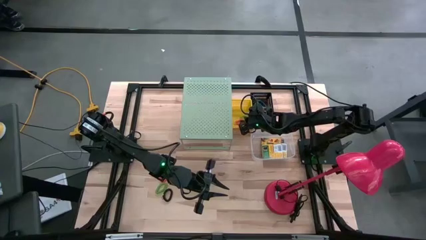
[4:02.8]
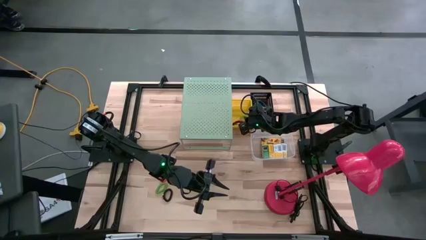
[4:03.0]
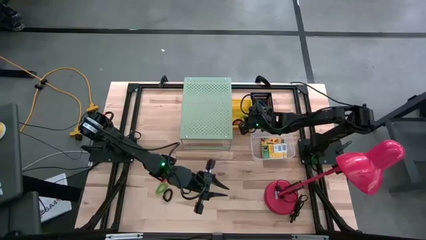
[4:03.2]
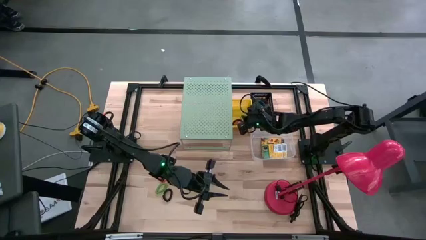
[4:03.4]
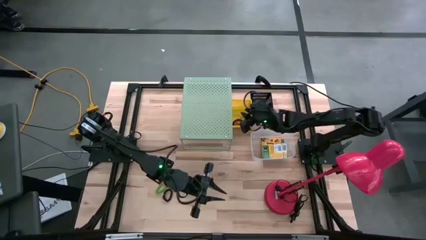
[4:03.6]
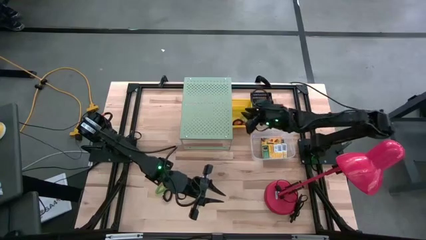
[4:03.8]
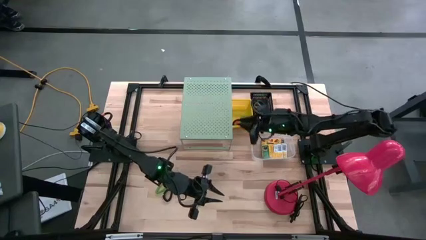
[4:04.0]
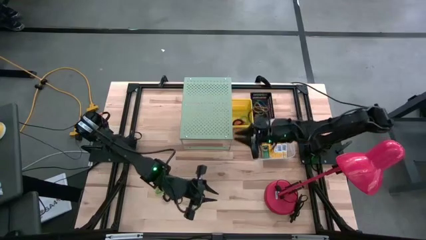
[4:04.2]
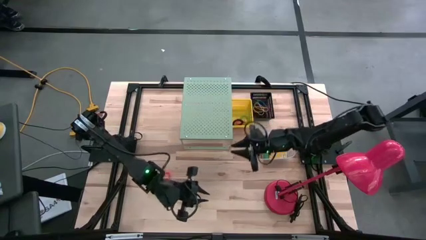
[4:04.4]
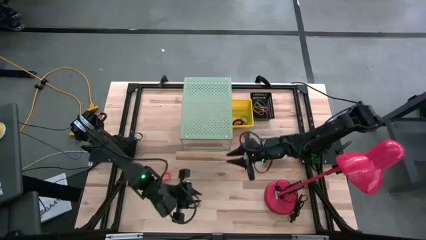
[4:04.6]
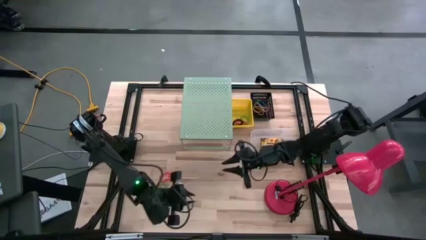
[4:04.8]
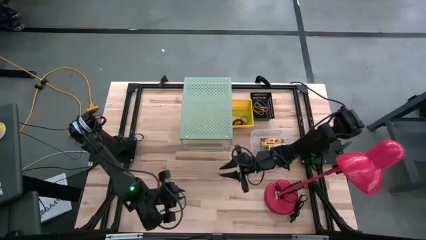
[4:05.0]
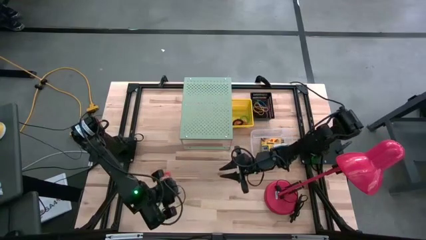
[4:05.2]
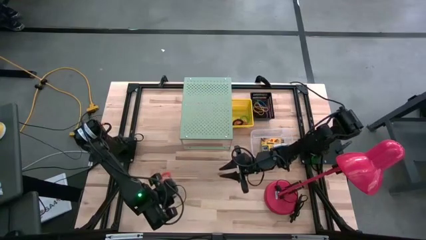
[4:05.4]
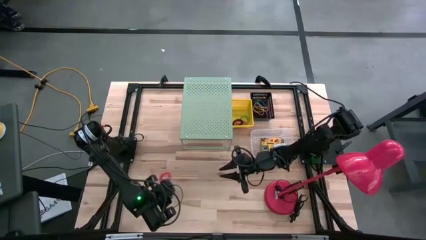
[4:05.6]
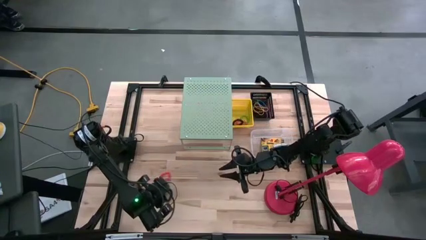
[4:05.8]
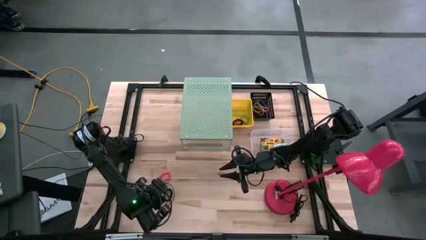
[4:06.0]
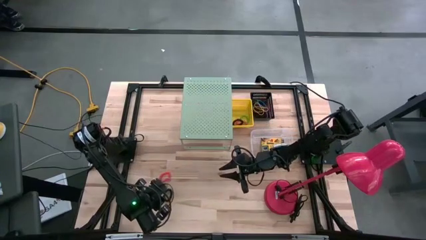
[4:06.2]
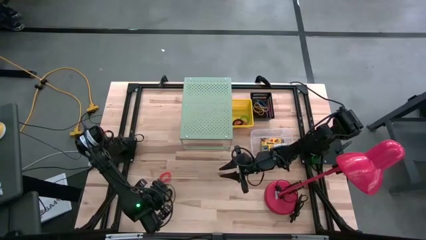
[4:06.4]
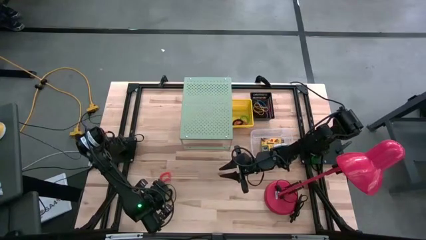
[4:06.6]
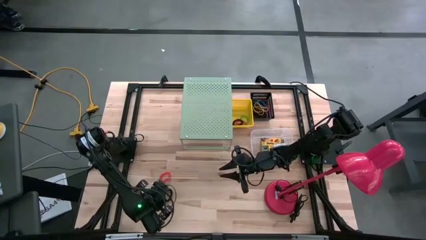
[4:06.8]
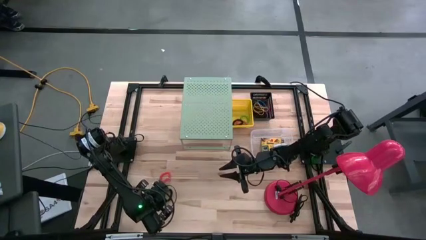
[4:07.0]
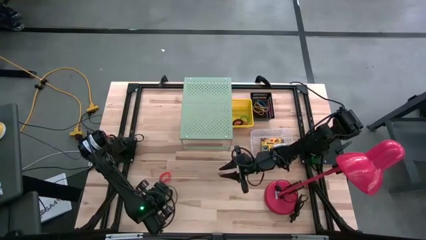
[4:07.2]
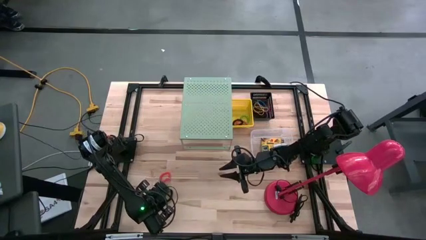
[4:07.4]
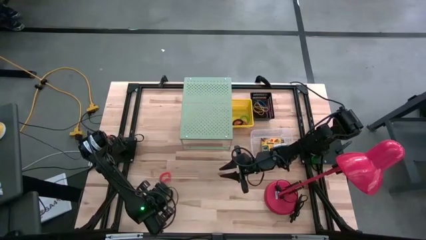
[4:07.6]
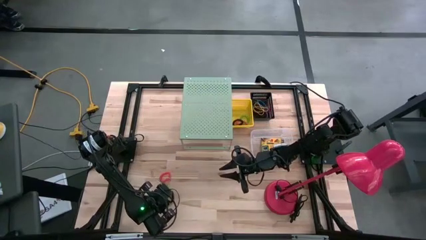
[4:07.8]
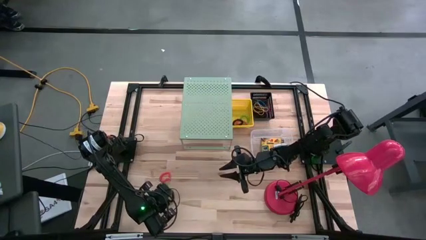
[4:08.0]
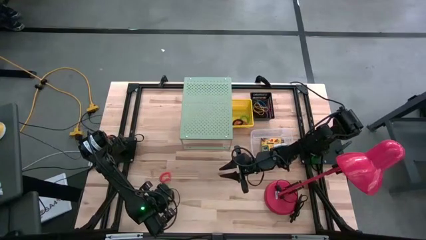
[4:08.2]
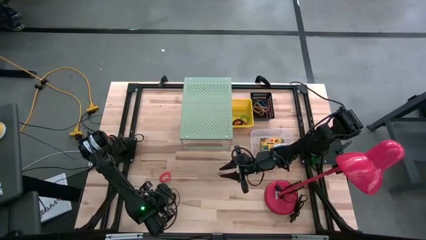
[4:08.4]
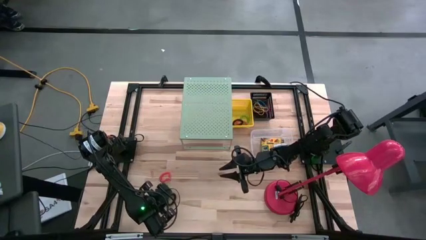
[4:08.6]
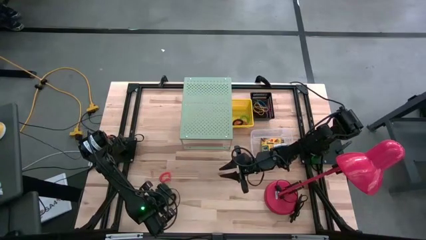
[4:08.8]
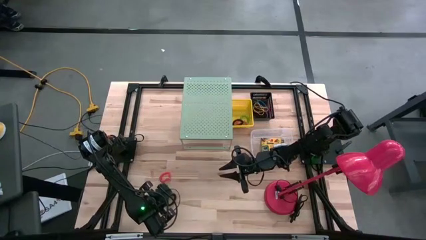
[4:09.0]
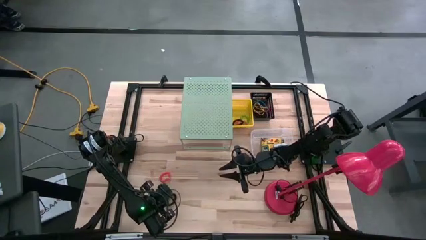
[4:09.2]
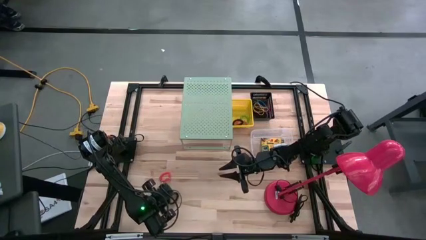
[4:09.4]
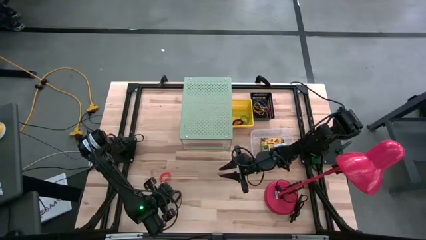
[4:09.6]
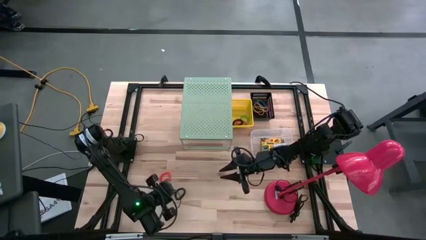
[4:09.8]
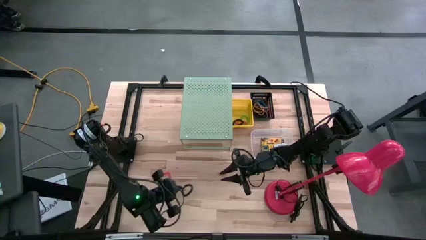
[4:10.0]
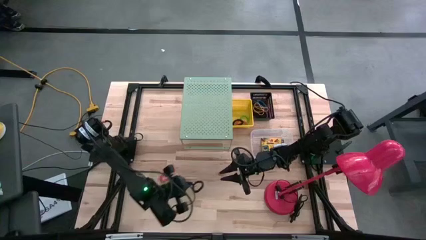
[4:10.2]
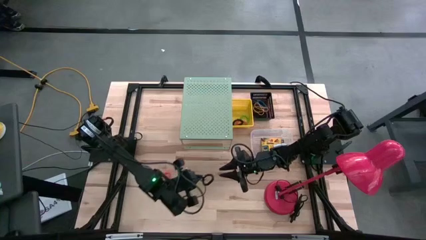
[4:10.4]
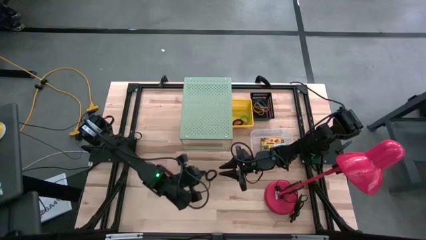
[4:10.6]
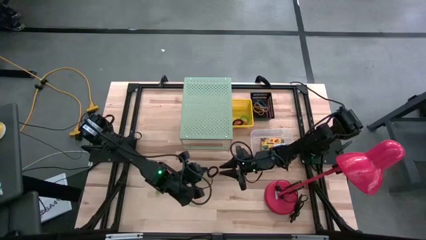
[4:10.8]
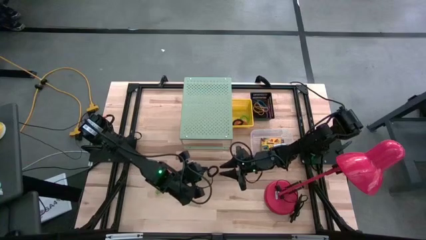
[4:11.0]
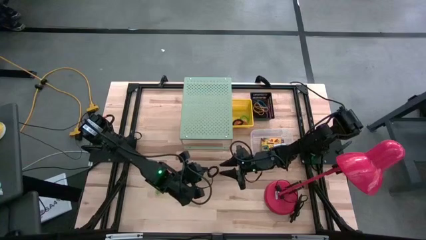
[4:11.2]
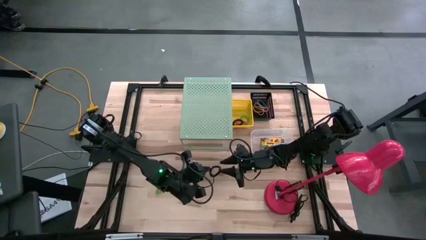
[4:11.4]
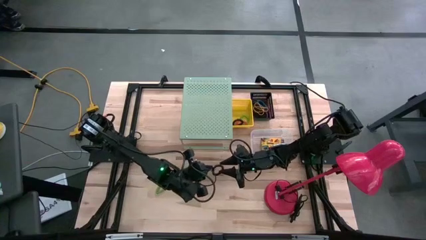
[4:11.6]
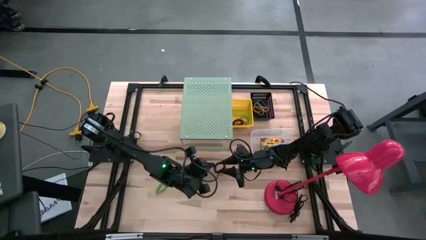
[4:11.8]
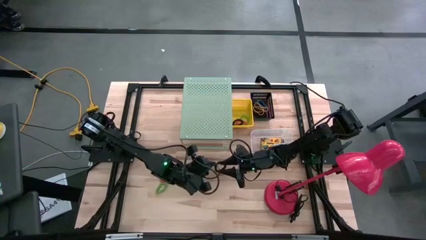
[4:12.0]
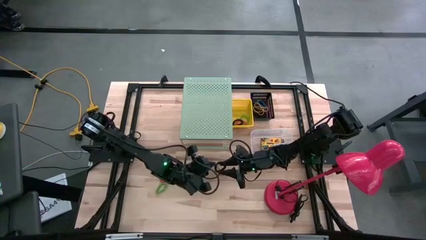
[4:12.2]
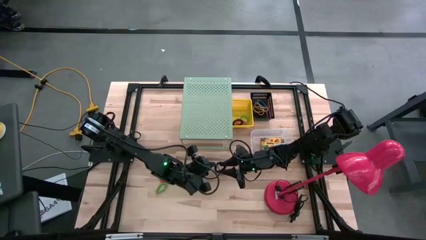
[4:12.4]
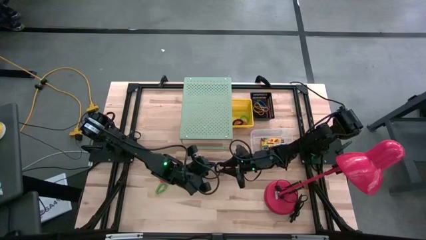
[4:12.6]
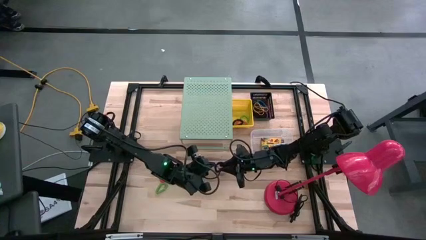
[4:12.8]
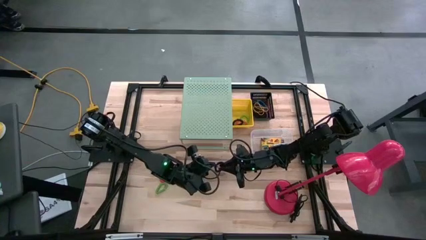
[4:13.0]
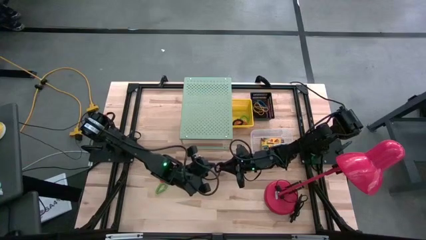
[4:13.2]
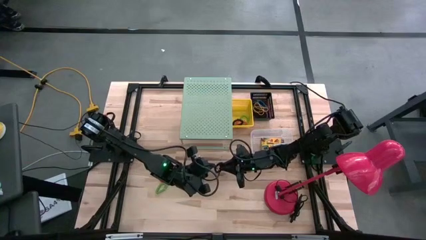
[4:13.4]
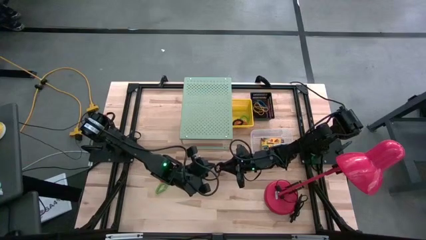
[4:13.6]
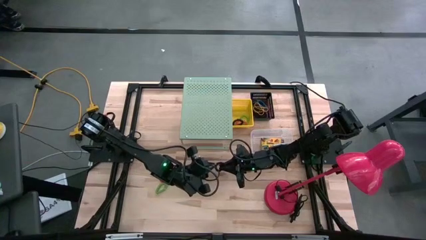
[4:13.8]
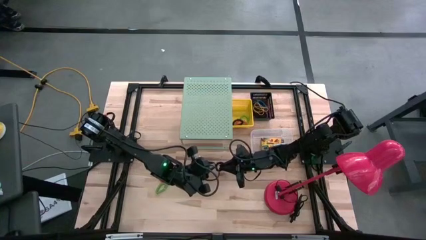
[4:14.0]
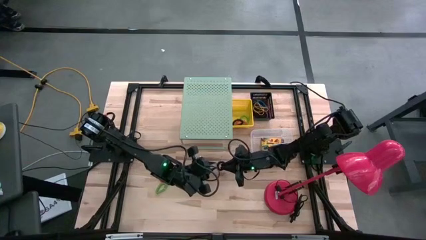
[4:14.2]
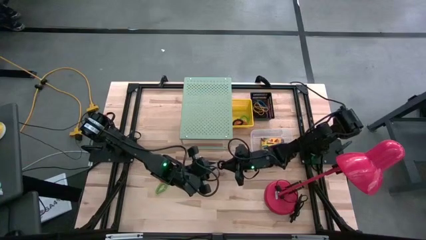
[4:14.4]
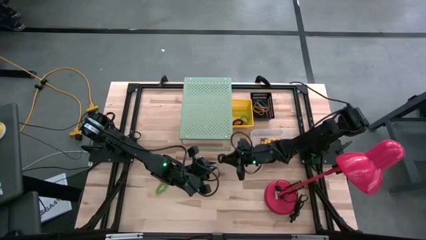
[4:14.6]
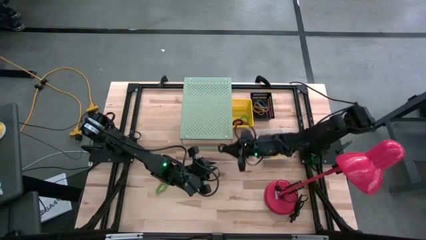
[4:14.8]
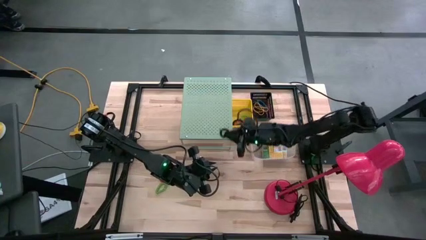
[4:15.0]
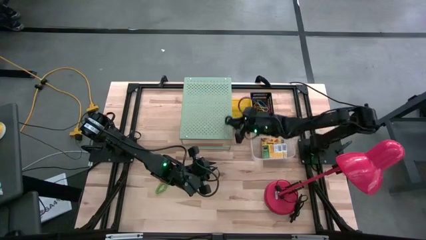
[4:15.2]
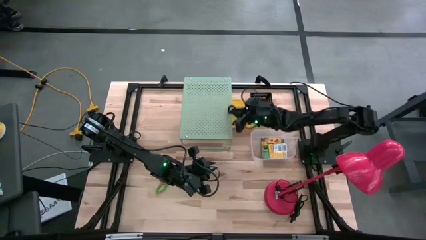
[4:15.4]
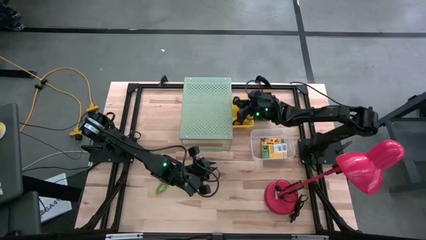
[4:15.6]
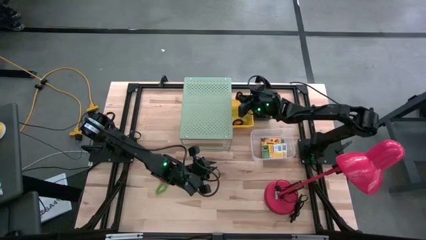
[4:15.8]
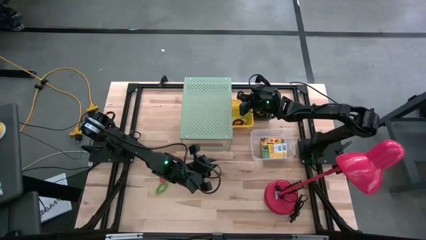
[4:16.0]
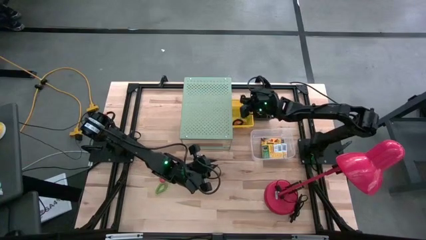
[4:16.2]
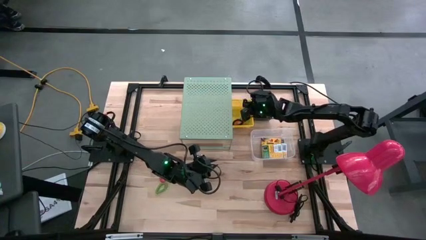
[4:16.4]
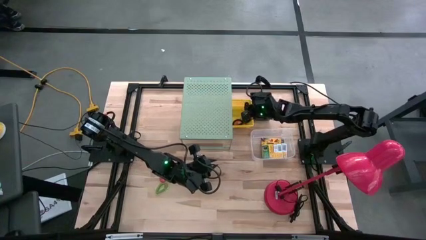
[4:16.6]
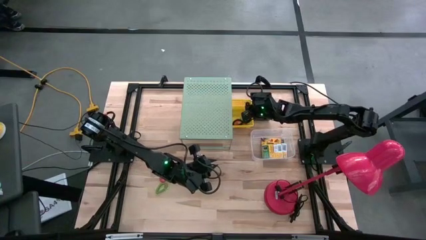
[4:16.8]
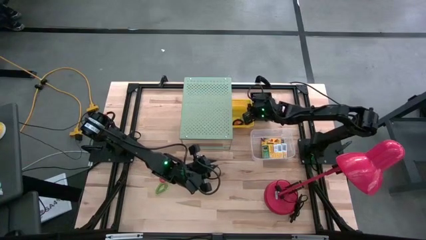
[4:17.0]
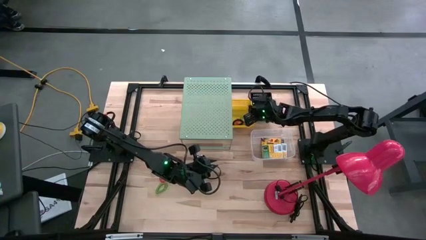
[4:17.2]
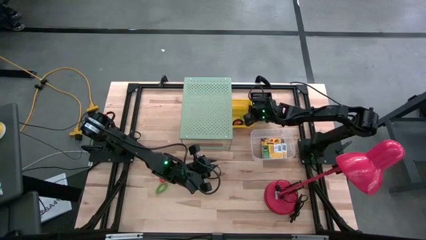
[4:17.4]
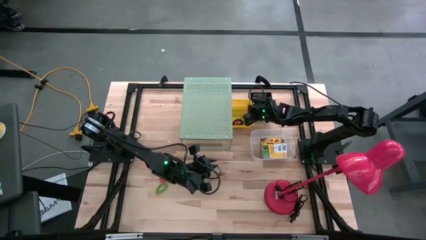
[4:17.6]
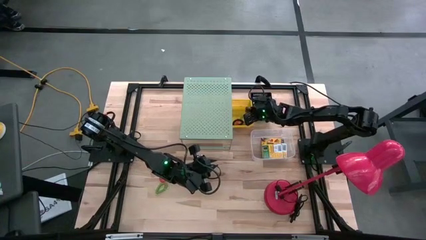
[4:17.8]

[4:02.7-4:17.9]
Task: Pick & Place Office Desk Supplies
Put the black spring keychain into the yellow bin
